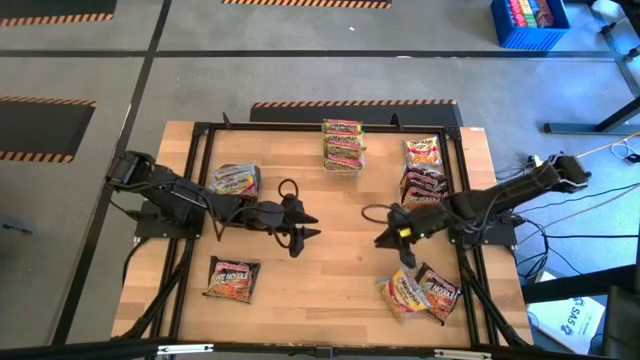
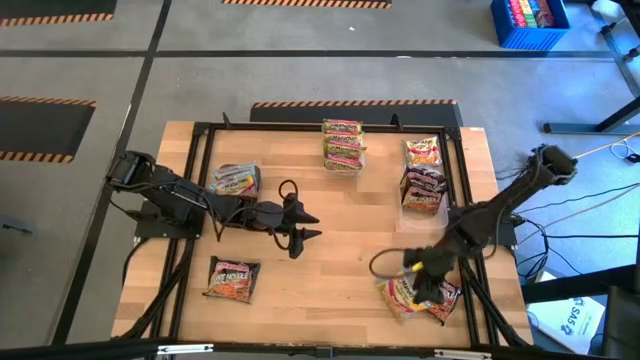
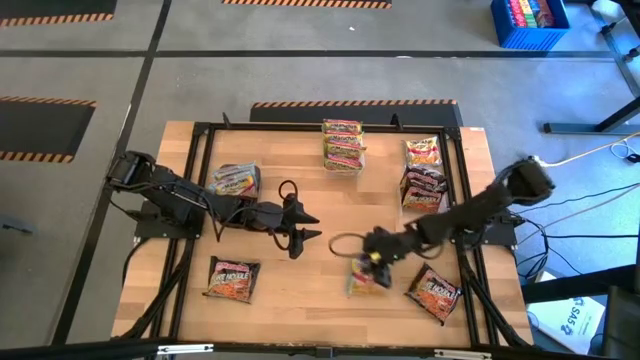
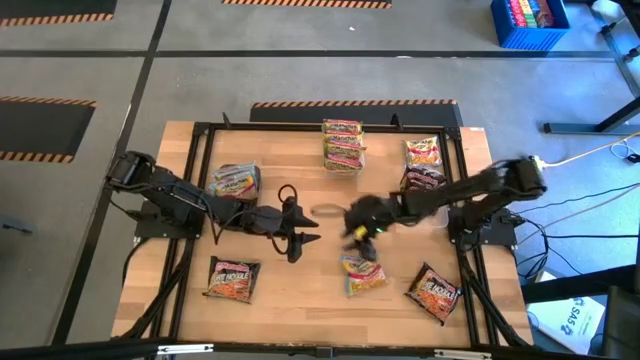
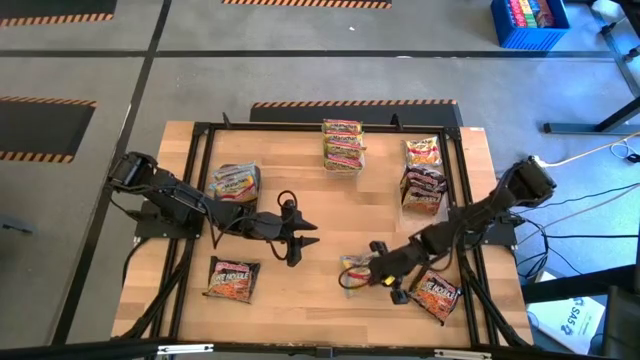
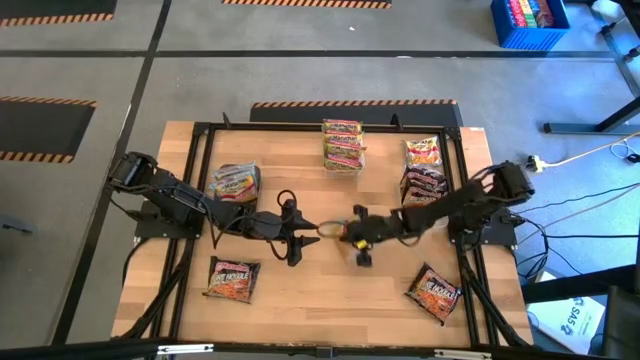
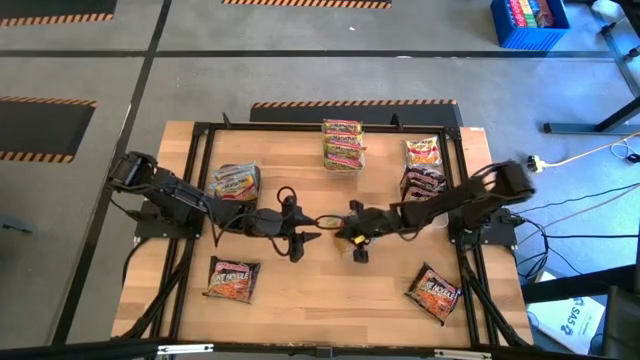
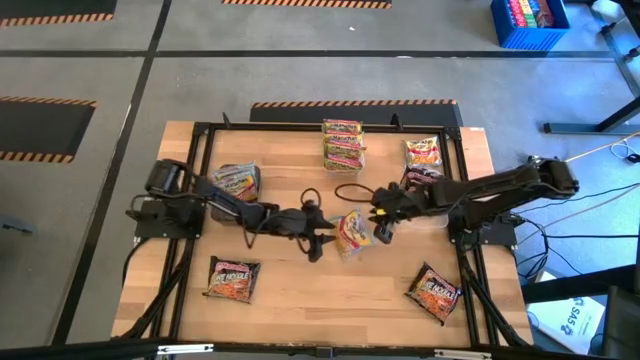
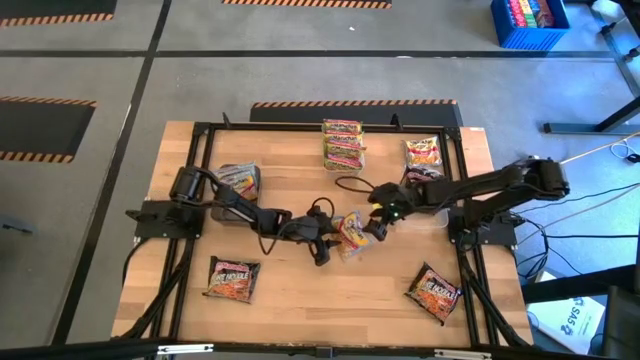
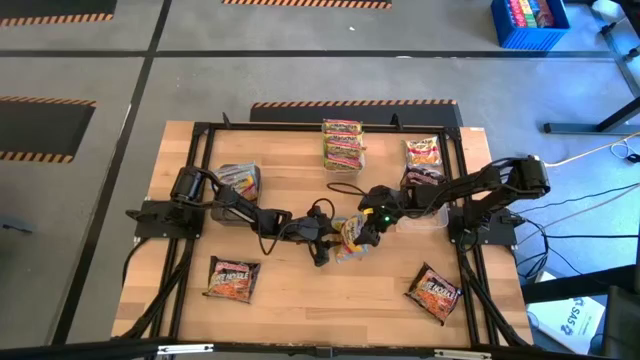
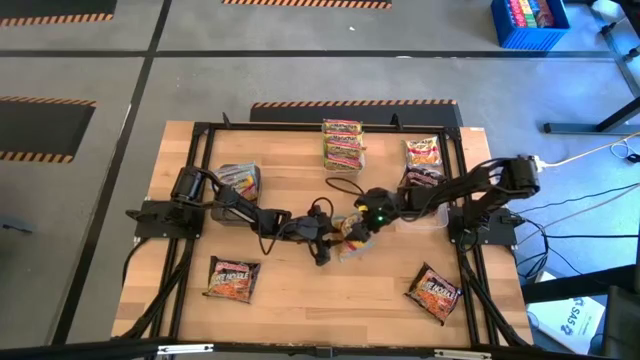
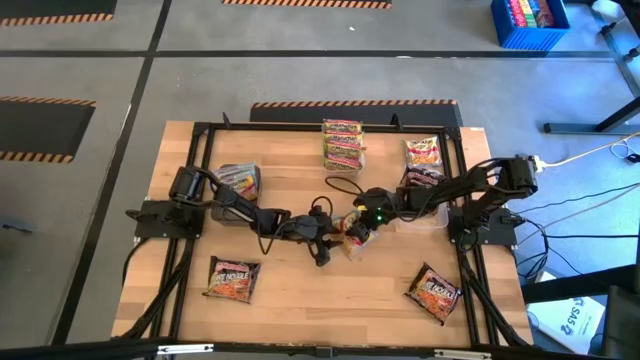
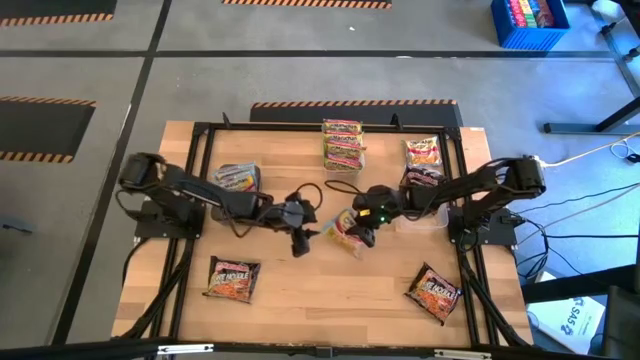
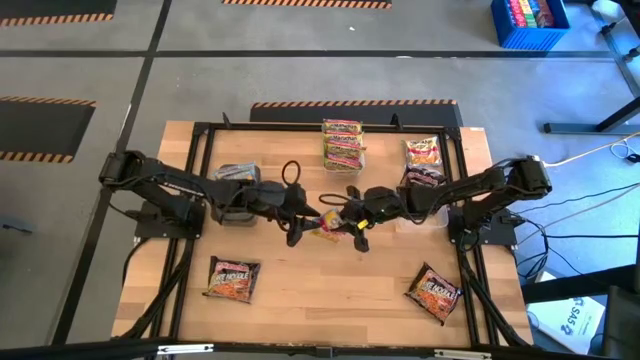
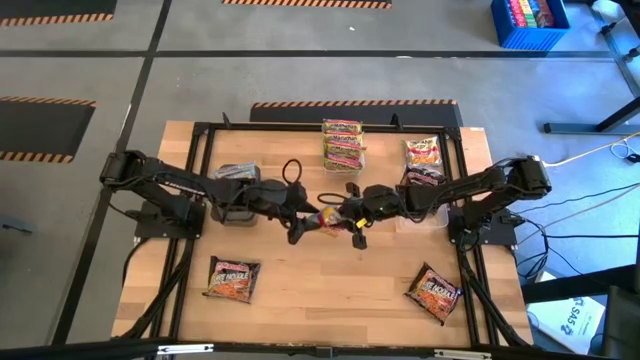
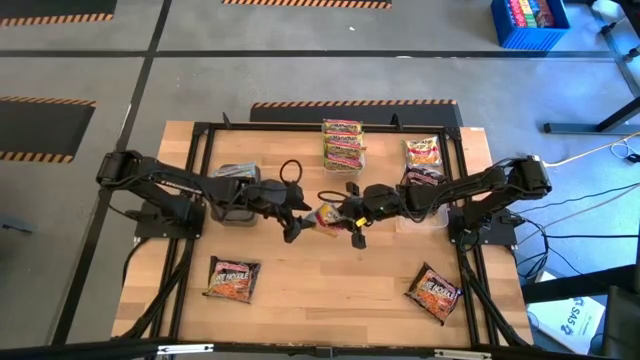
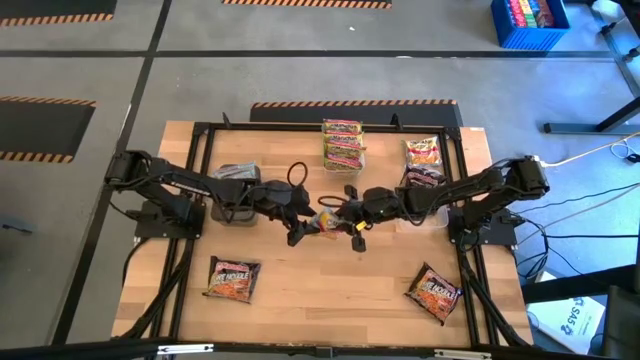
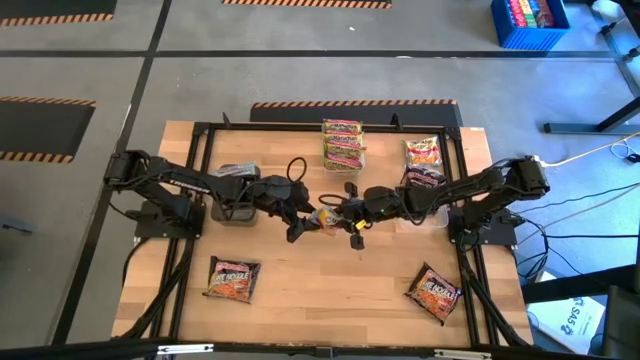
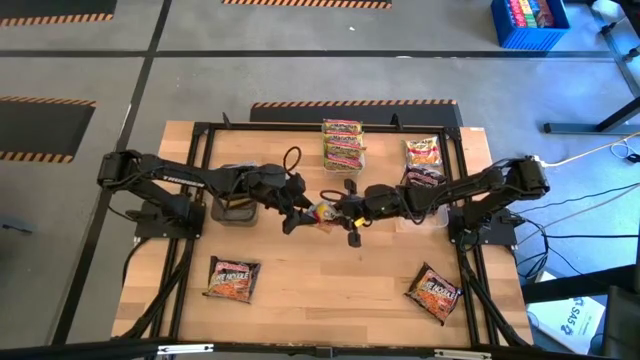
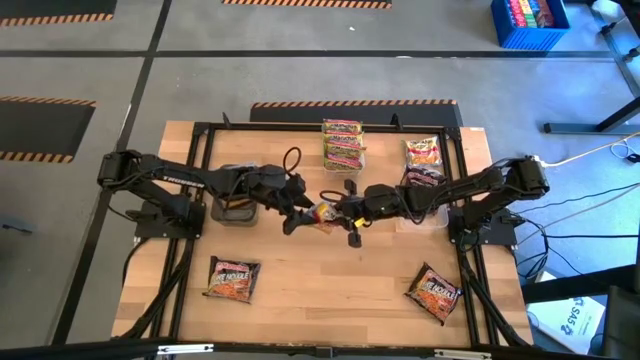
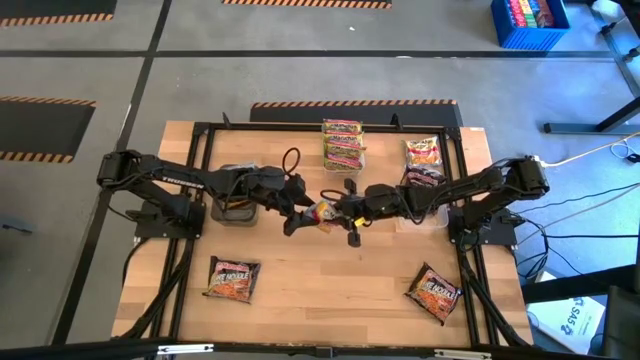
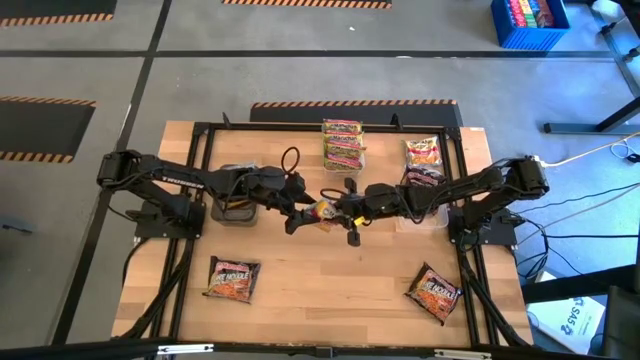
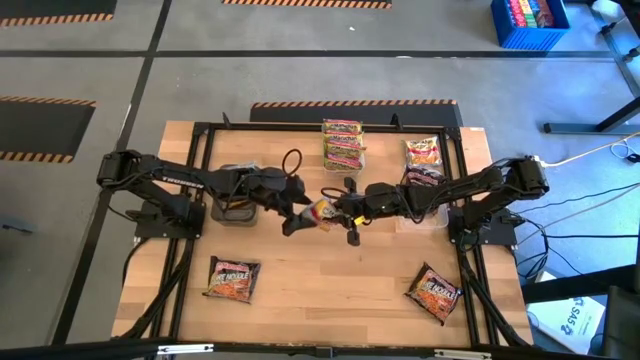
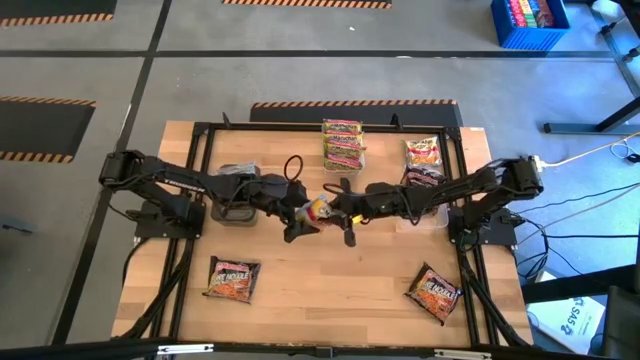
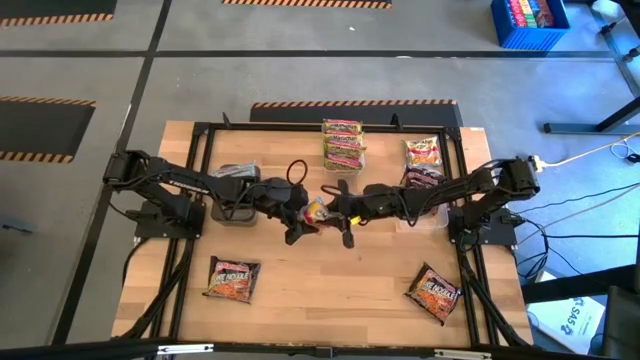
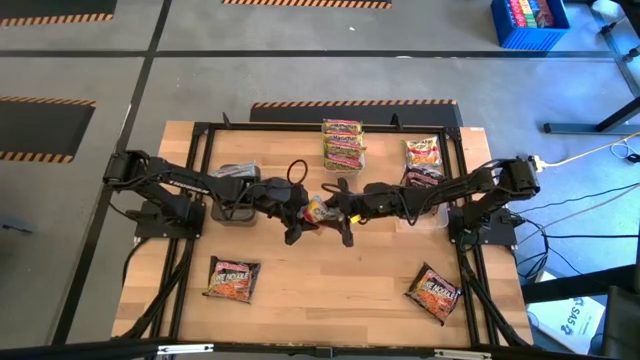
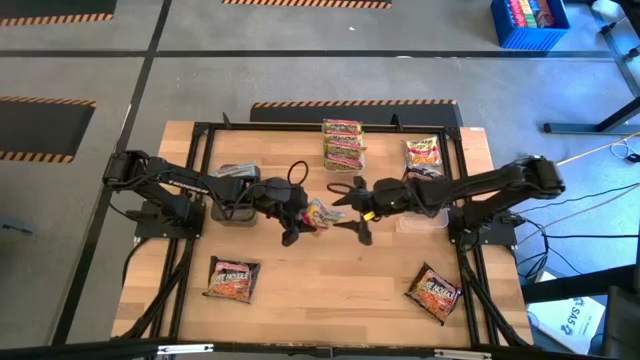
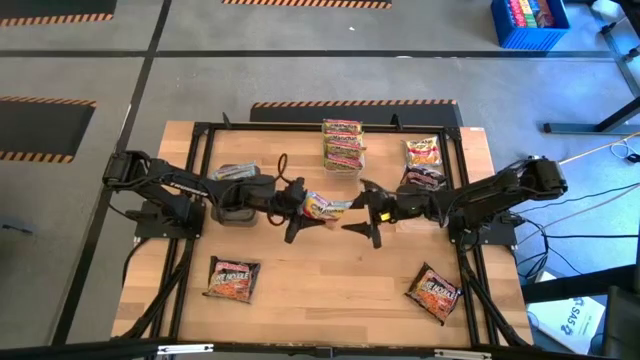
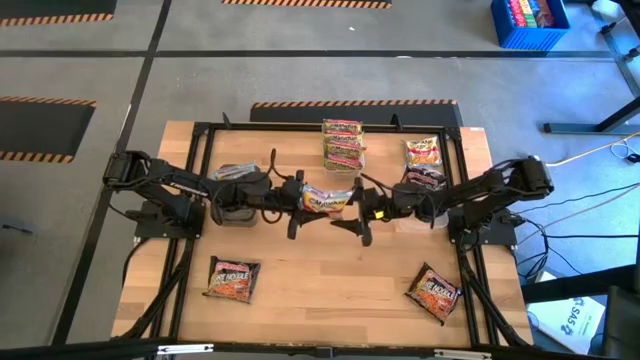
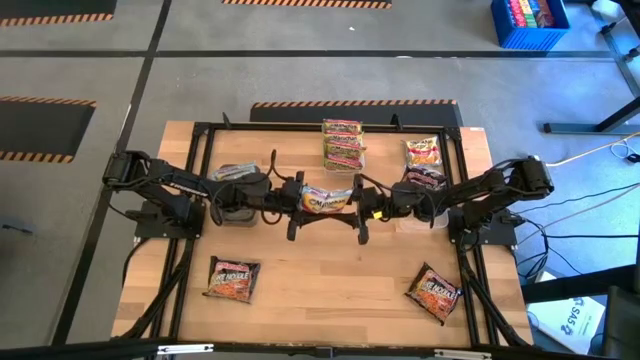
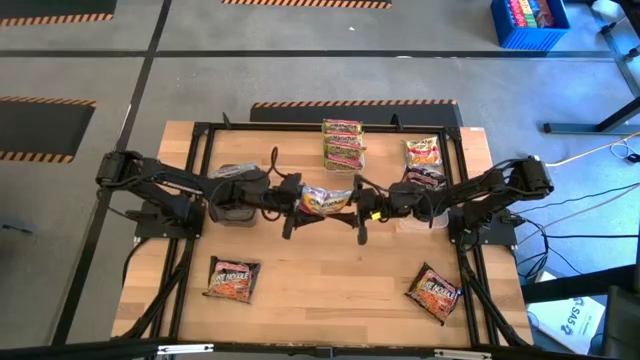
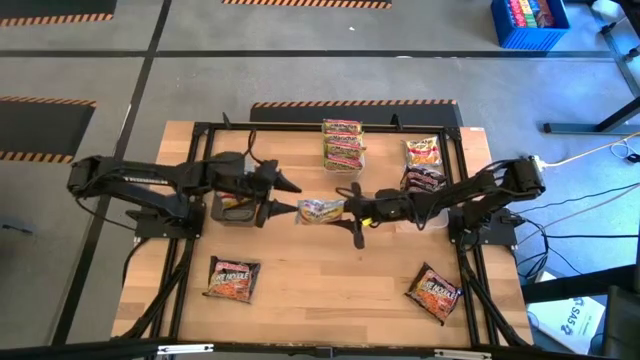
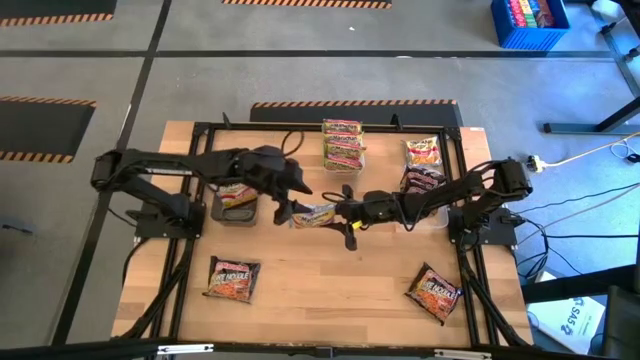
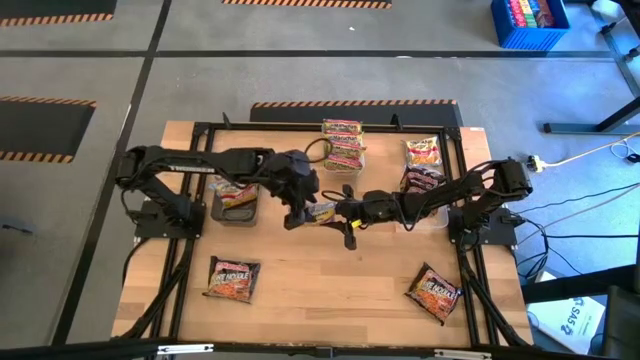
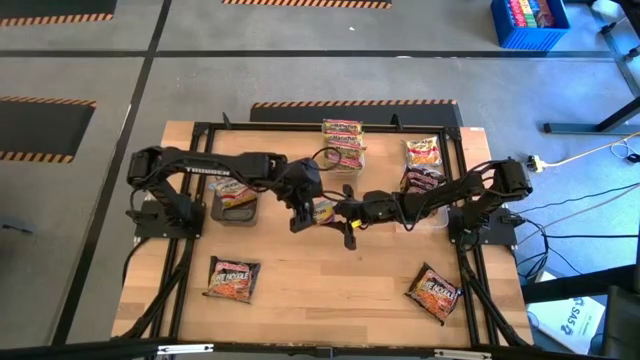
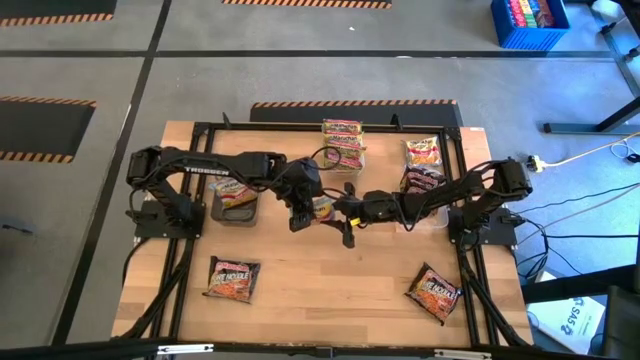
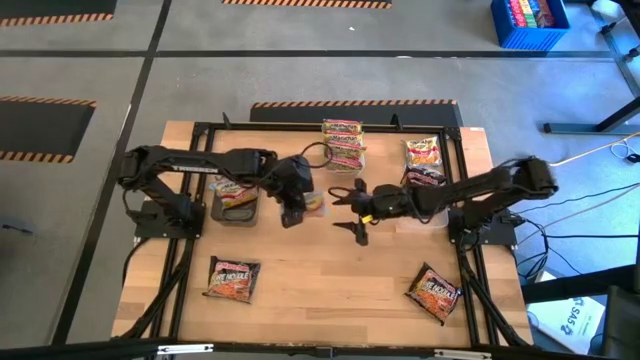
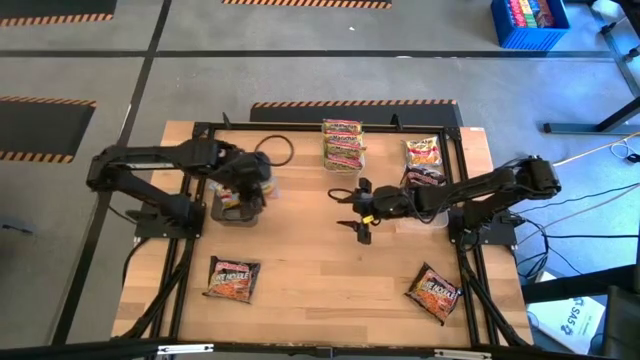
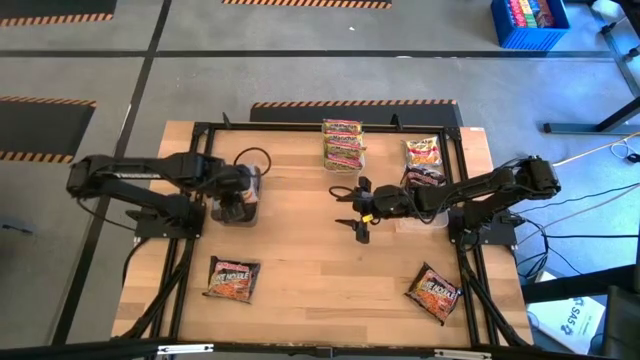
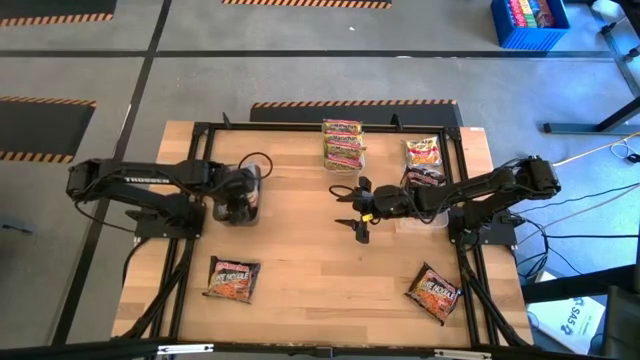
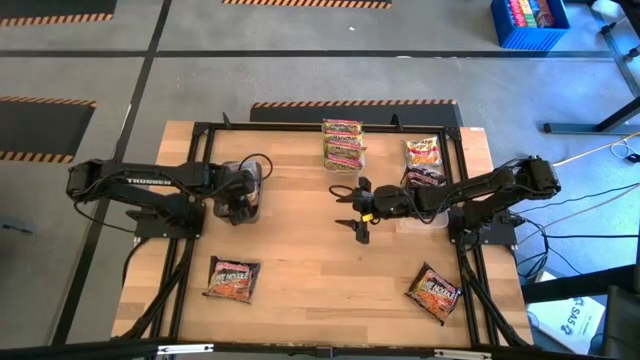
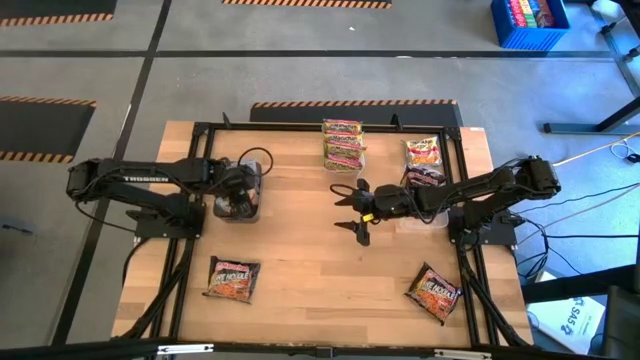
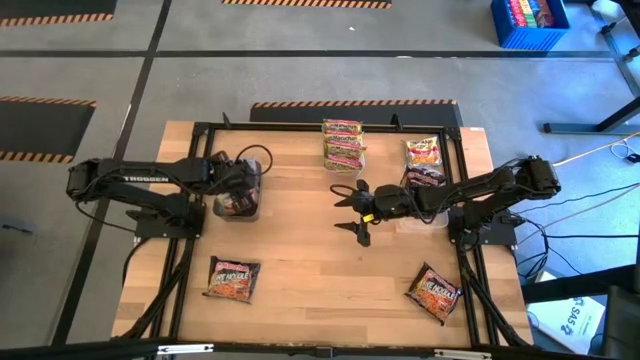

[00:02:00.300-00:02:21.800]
Task: Sort Maruchan noodles
Put the bottom blue noodle pack into the black bin
